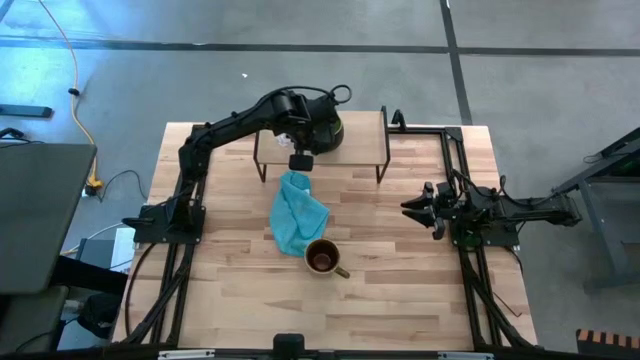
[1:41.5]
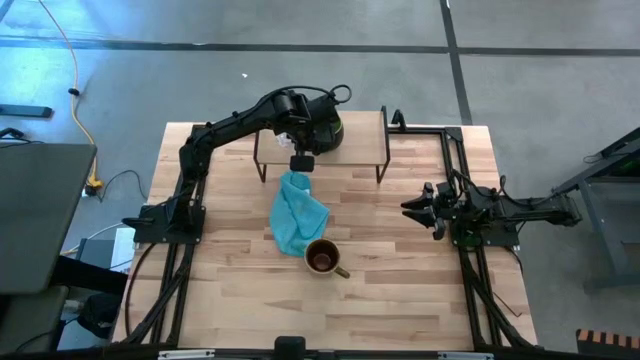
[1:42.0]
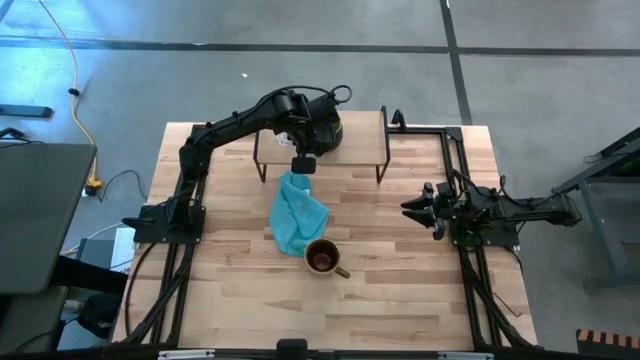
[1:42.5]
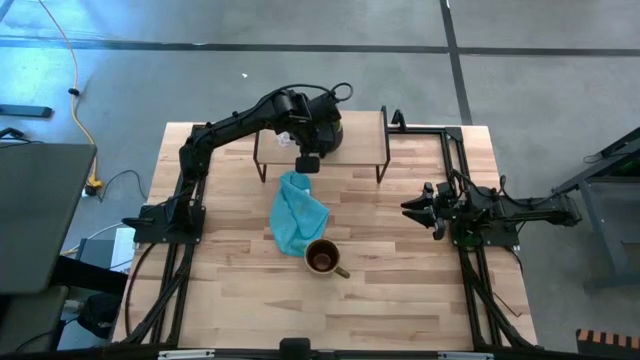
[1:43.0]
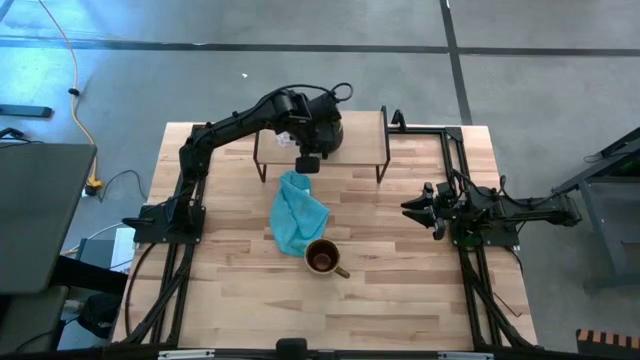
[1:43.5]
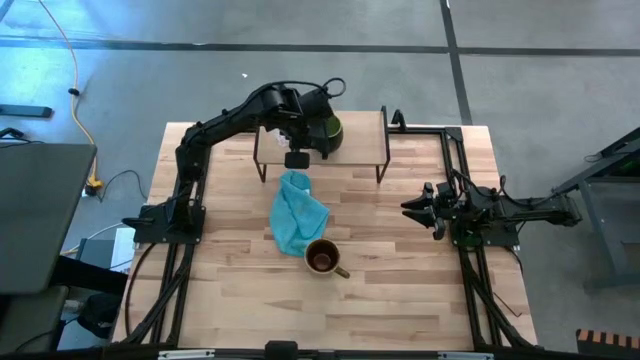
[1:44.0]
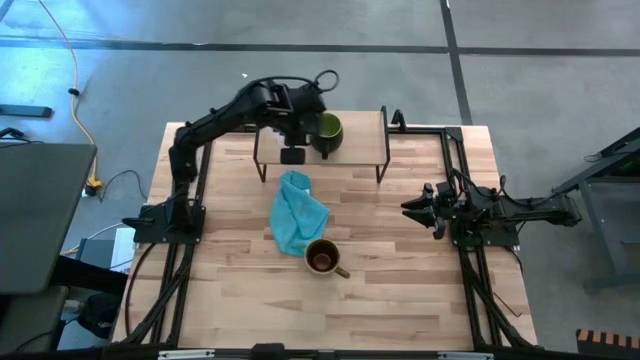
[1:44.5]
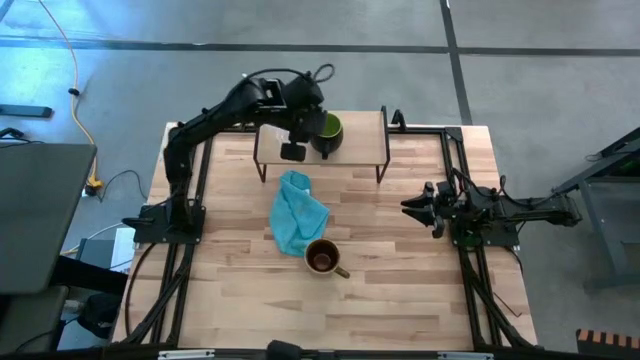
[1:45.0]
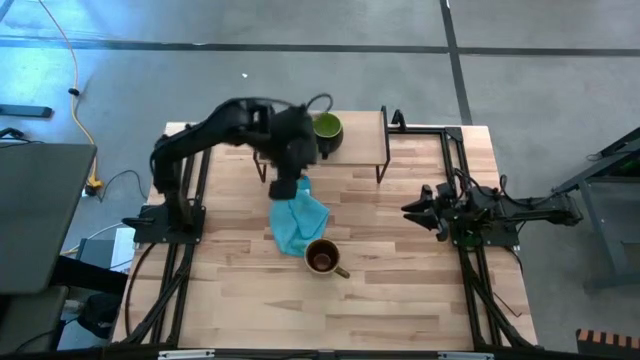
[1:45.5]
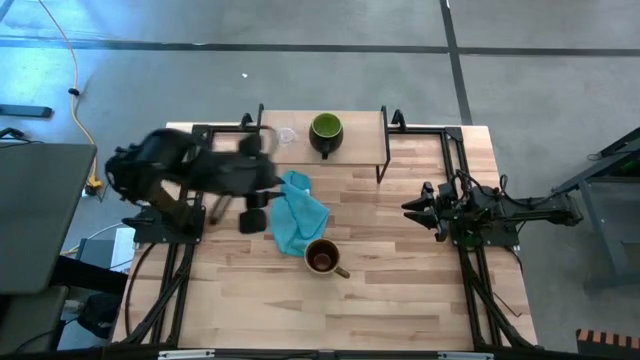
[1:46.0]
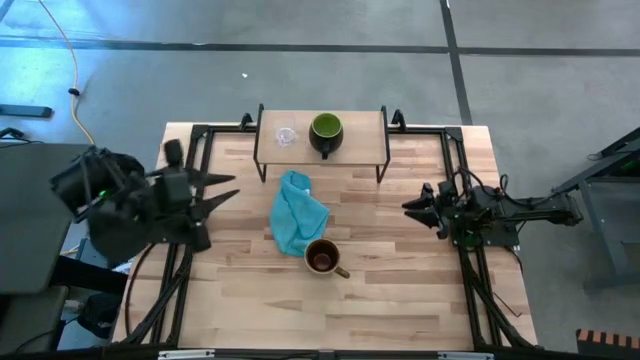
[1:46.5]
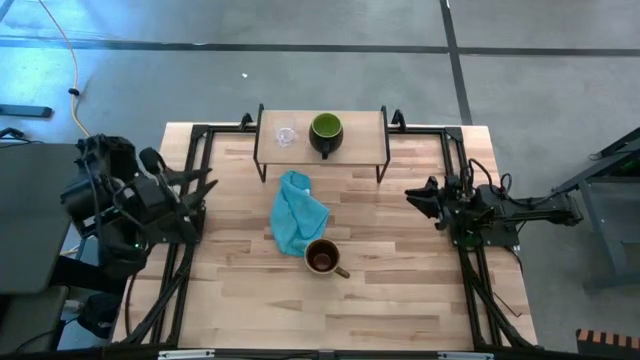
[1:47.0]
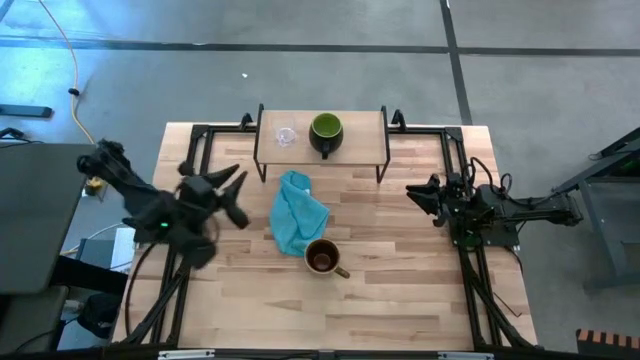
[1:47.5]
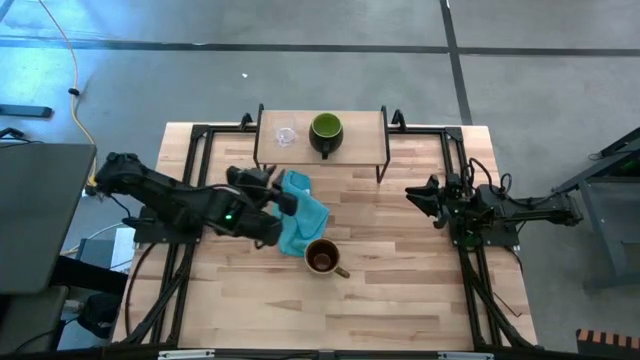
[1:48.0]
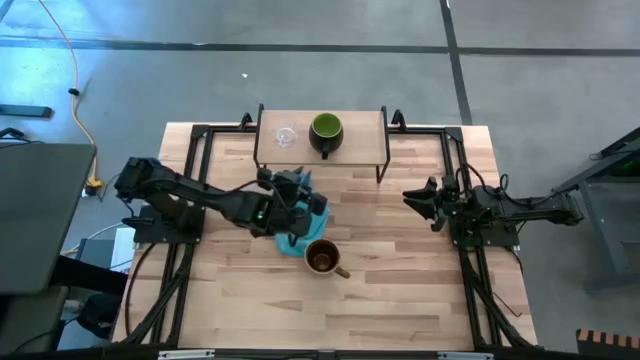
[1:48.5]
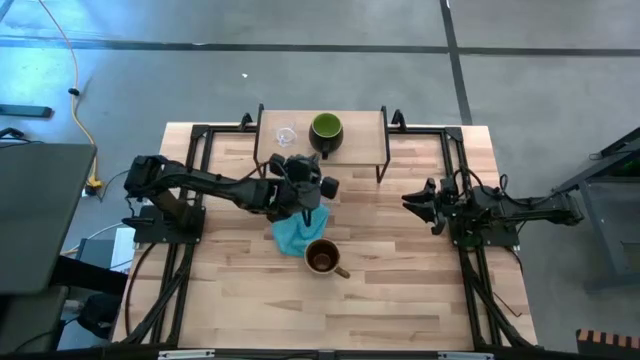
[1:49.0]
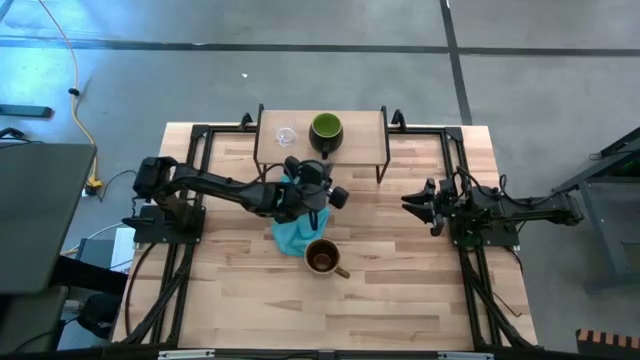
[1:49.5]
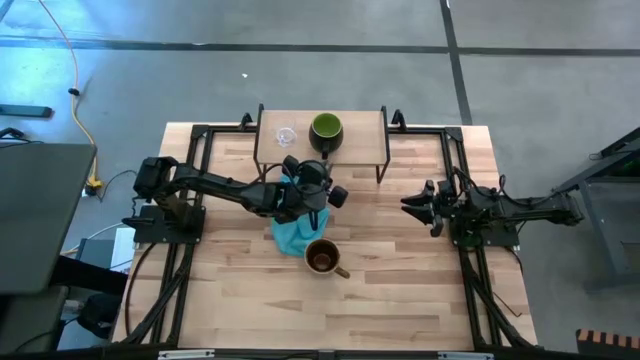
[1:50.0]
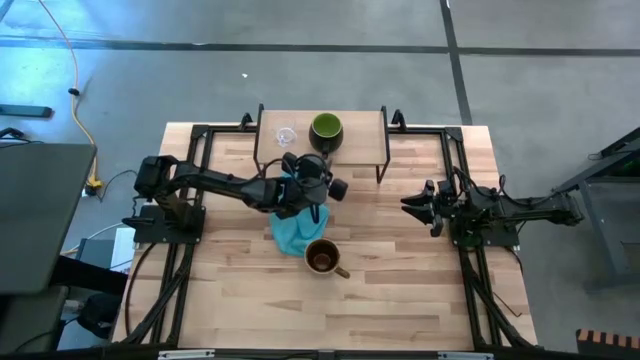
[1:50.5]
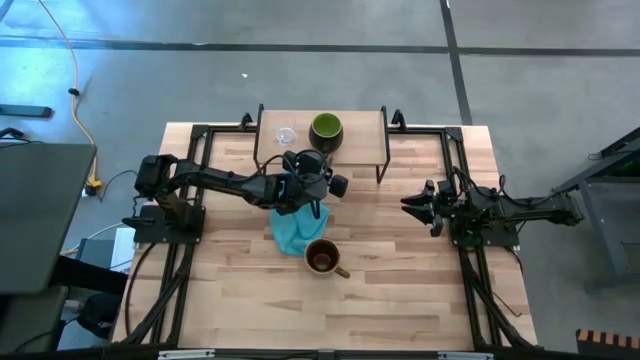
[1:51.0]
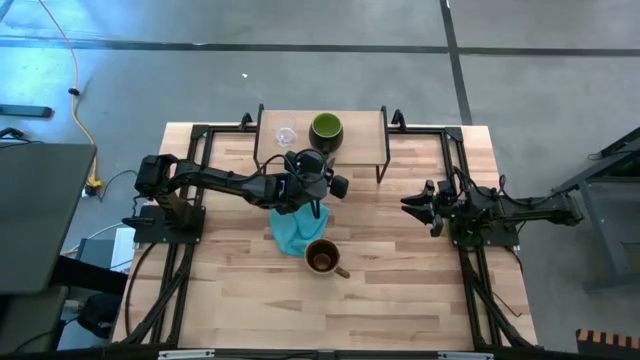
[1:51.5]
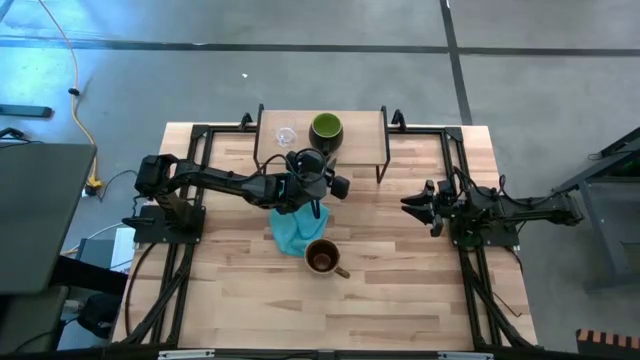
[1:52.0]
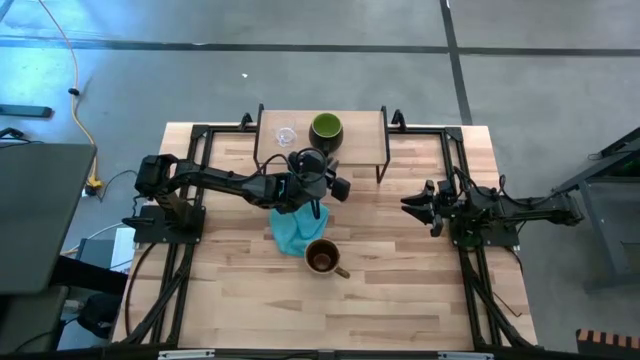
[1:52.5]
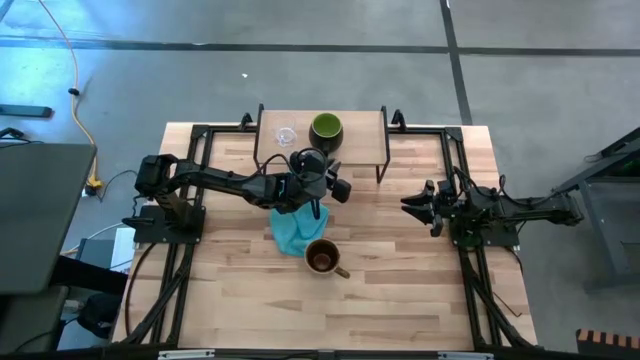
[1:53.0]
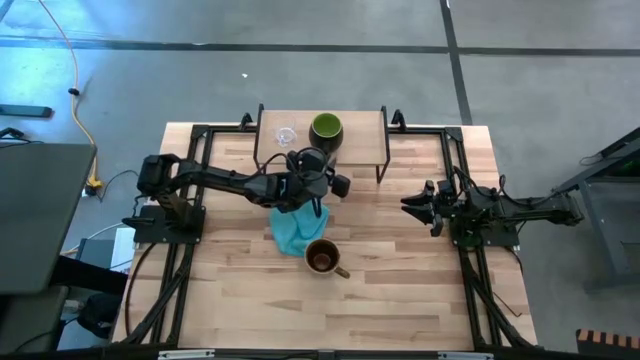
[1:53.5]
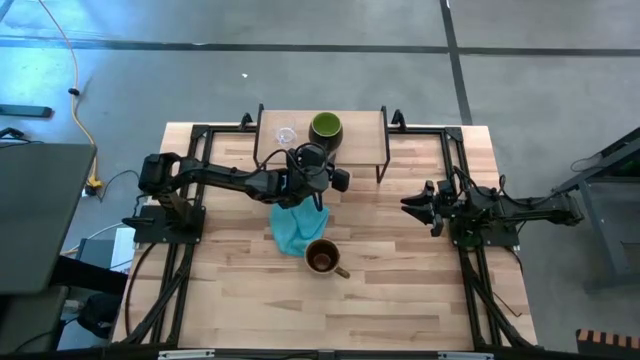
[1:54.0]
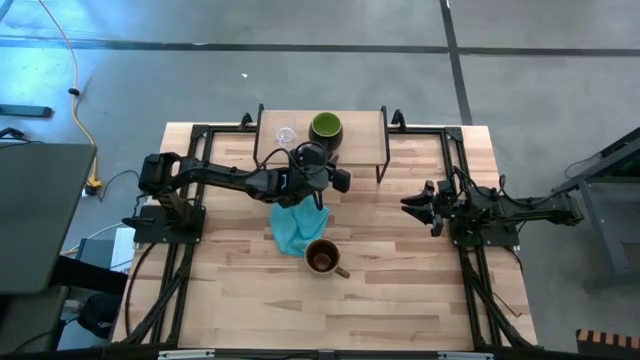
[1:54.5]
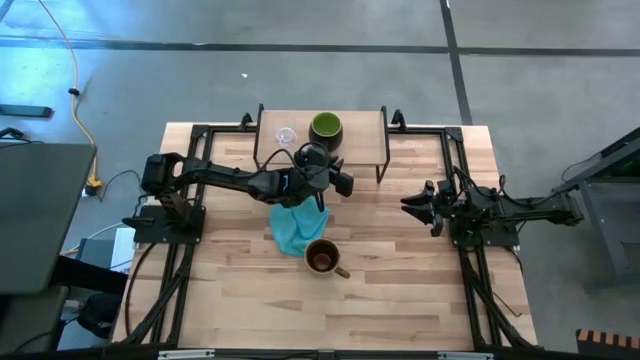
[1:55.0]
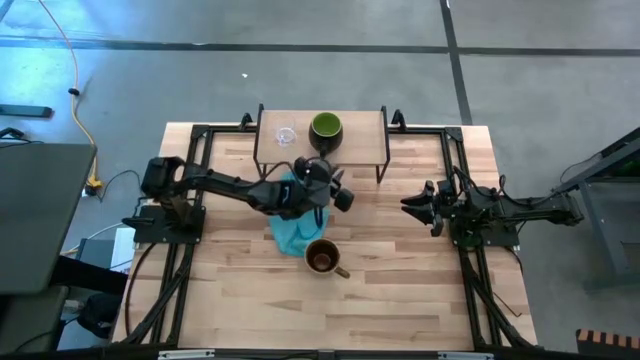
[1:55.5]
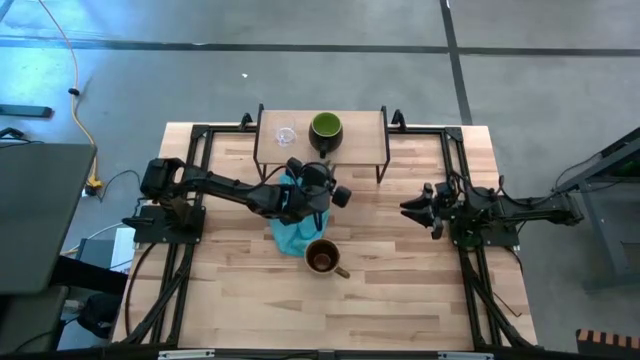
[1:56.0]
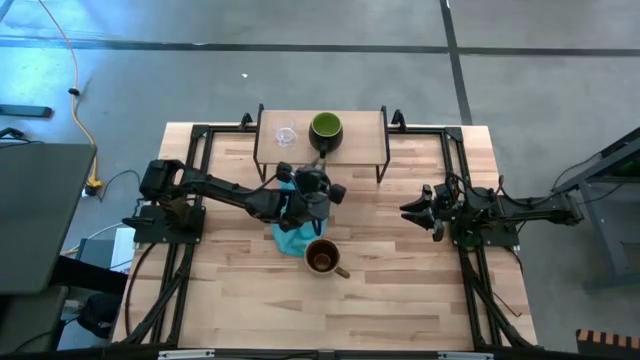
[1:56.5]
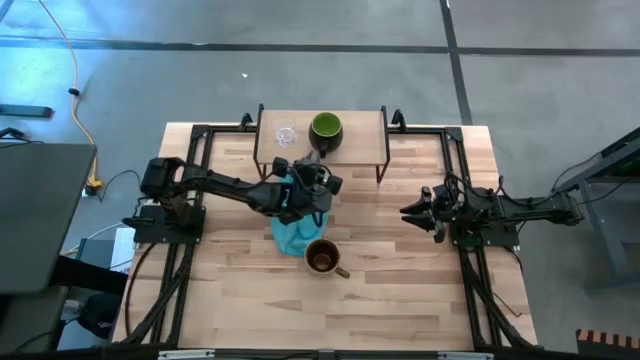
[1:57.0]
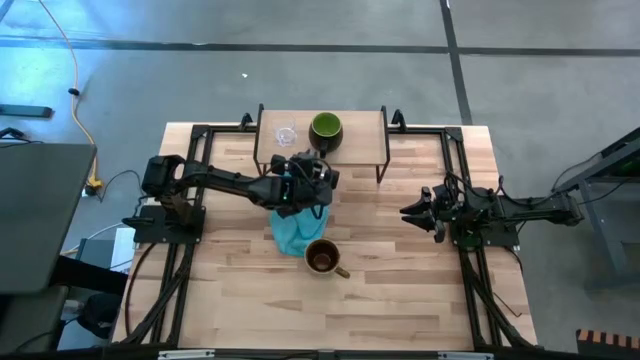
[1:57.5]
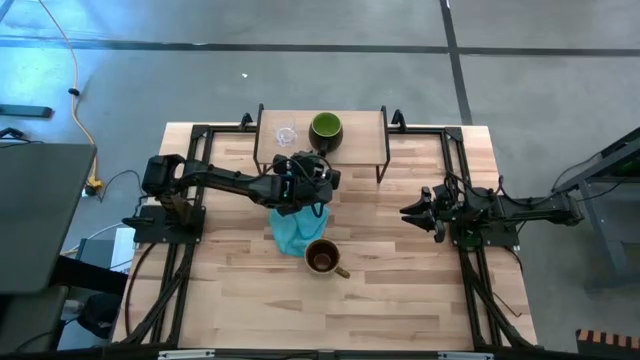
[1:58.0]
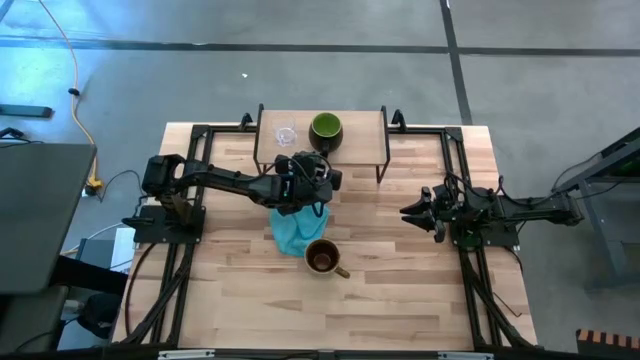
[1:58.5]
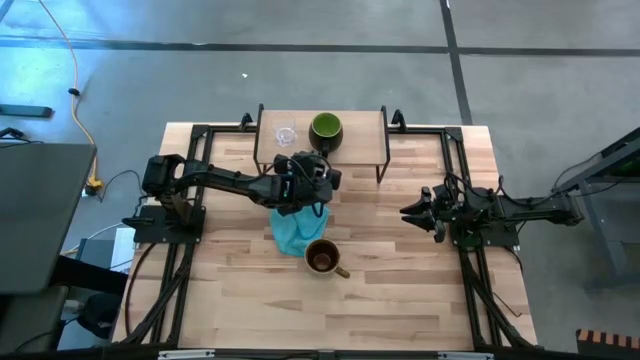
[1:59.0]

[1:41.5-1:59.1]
Task: Stack small to large cups/mugs on shelf
Put the green mug on the shelf

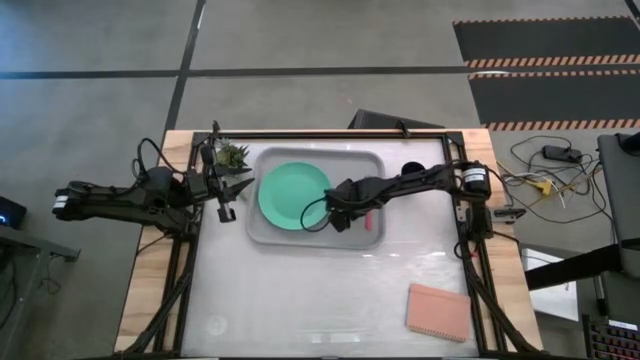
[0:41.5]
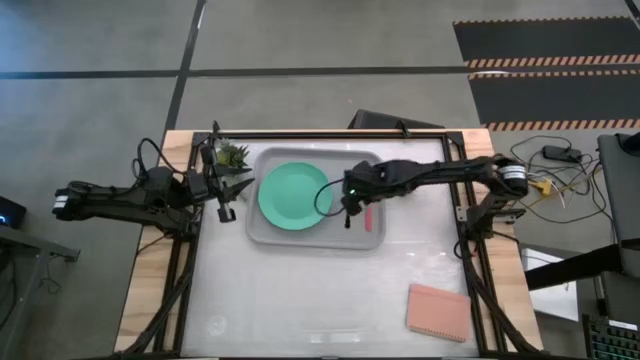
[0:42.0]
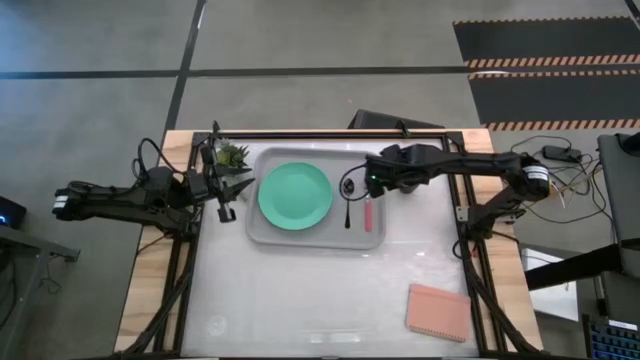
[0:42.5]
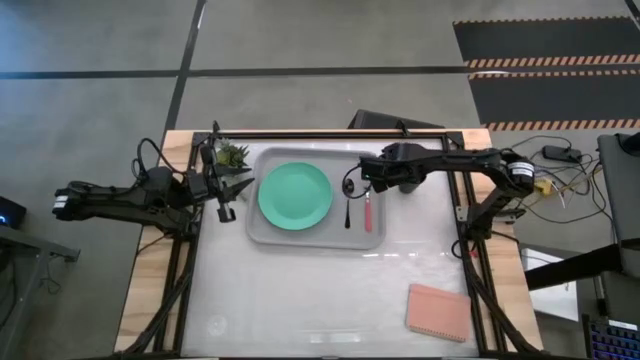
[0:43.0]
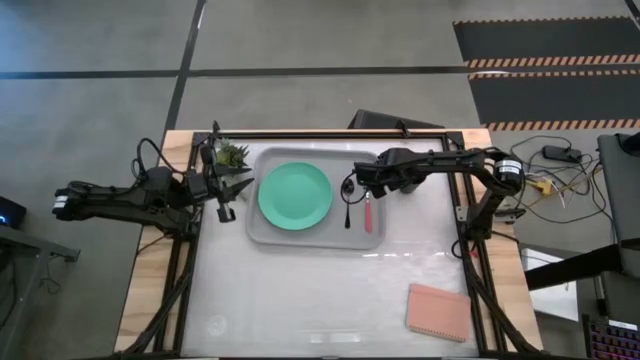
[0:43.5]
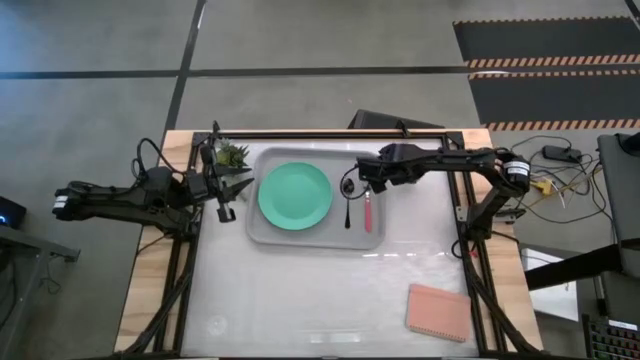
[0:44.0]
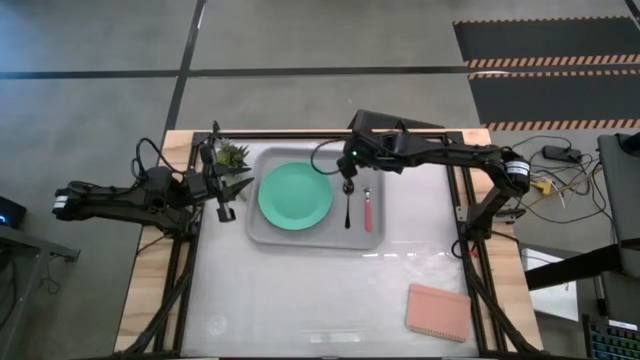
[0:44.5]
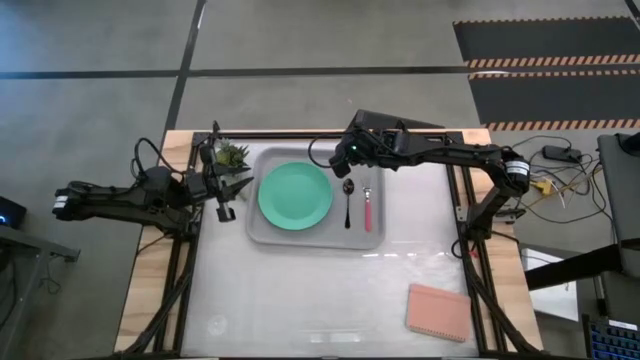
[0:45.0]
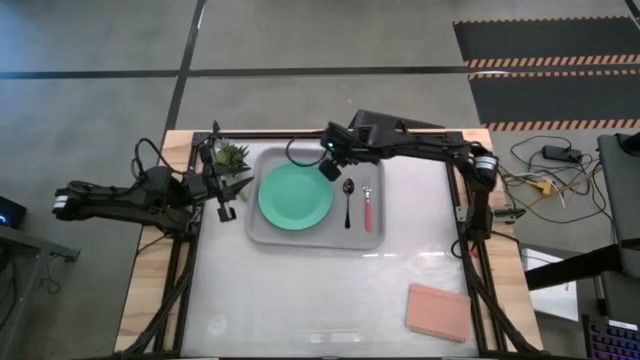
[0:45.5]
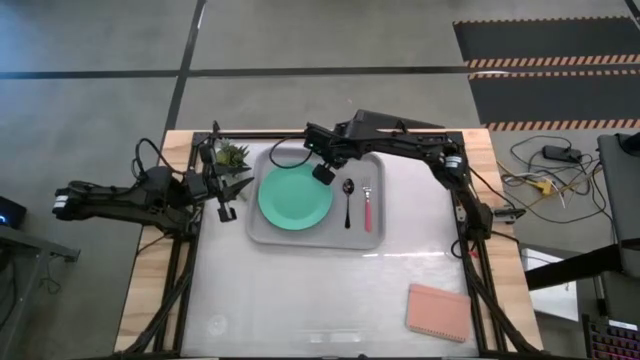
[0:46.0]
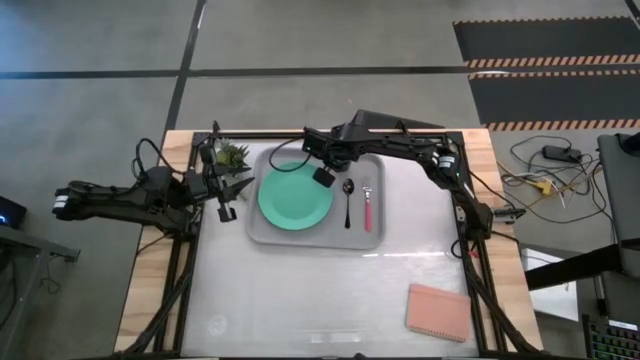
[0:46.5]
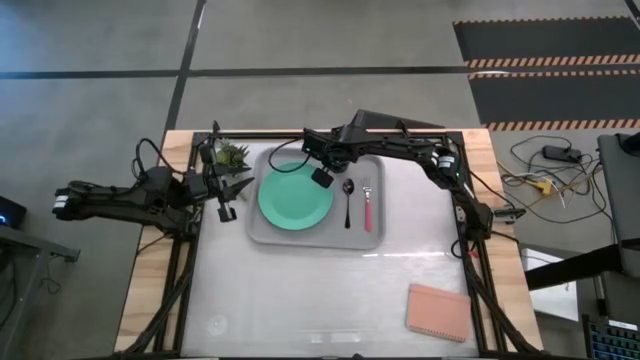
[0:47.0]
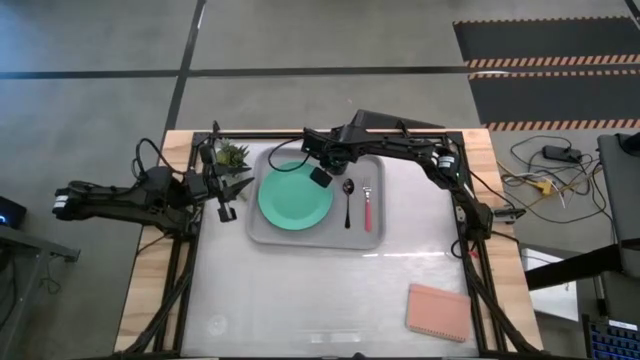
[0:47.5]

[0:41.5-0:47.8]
Task: Pick and place plate/cup/fork/spoon on tray
Put the black cup on the gray tray to the top right of the light green plate
